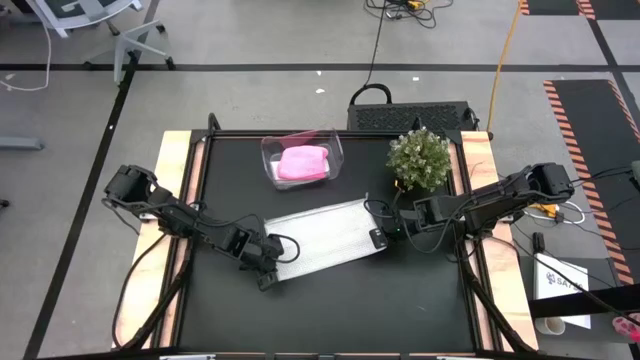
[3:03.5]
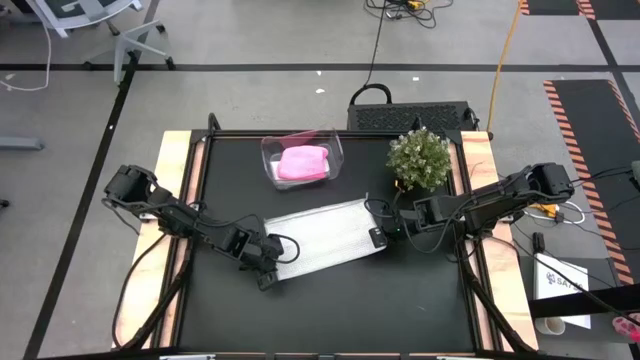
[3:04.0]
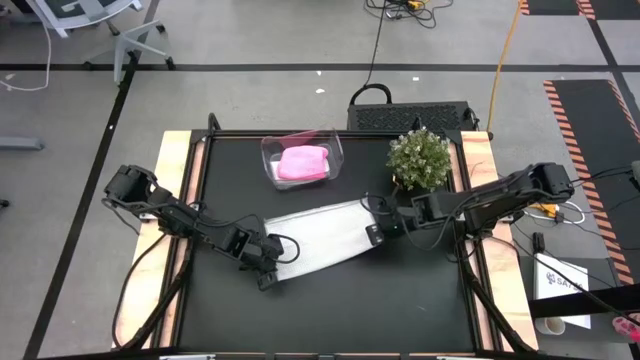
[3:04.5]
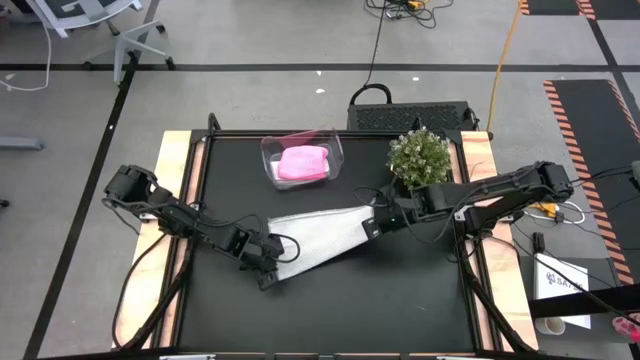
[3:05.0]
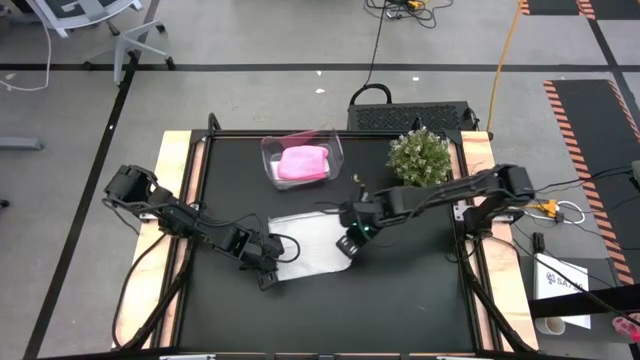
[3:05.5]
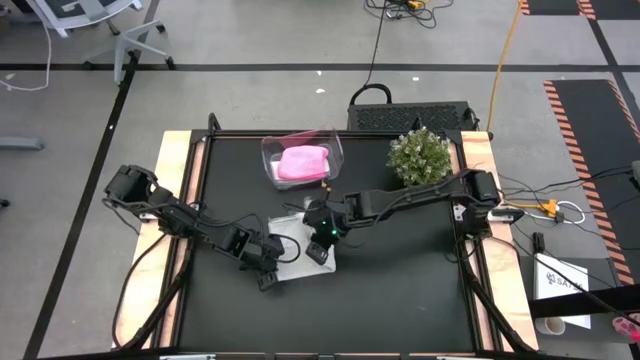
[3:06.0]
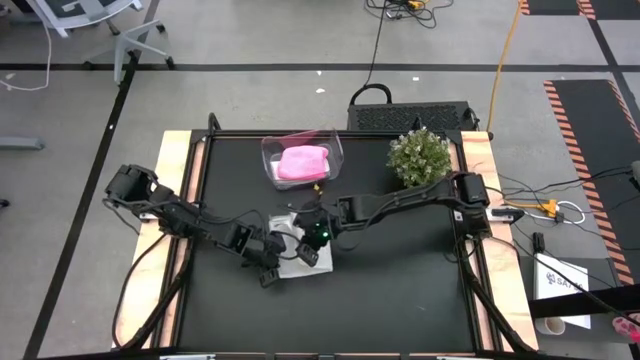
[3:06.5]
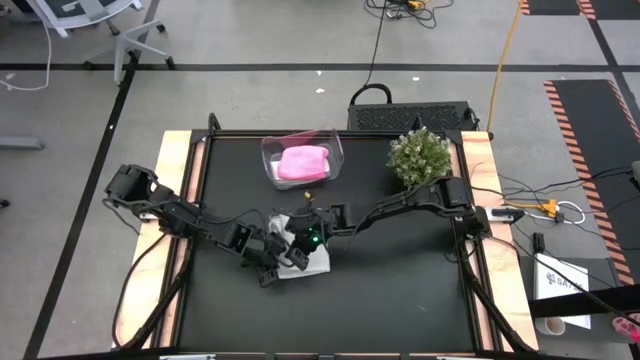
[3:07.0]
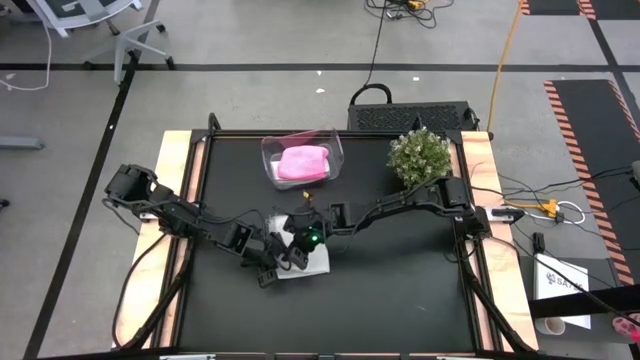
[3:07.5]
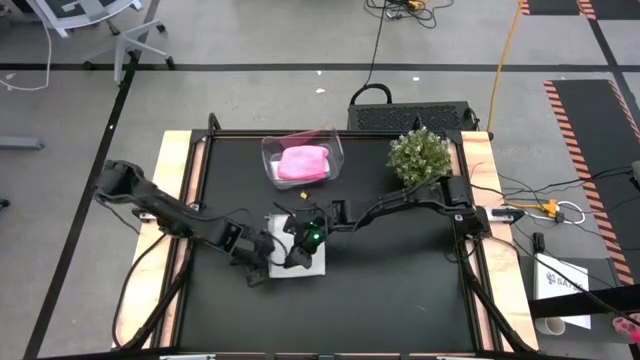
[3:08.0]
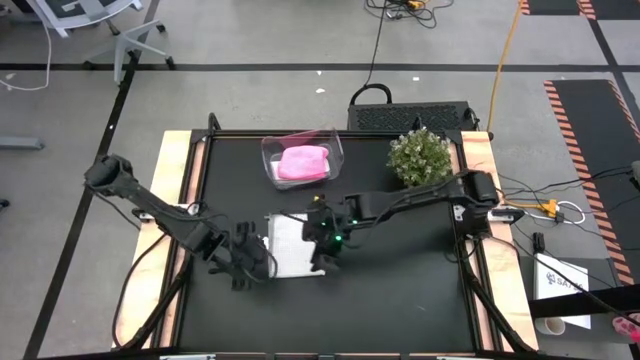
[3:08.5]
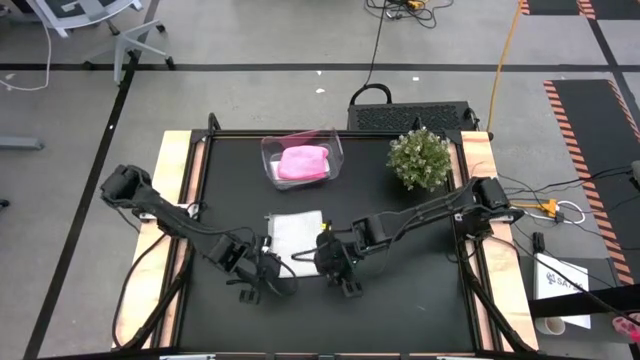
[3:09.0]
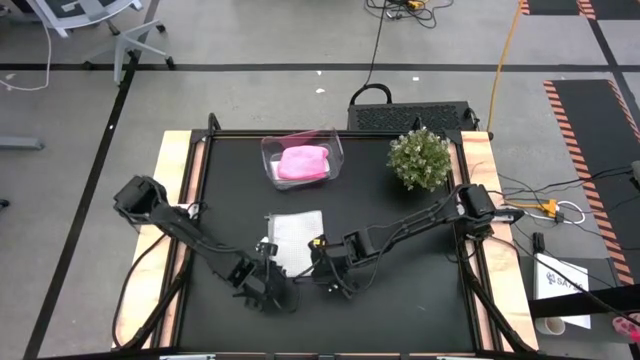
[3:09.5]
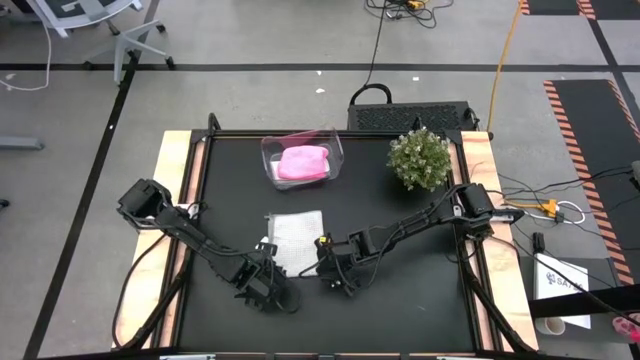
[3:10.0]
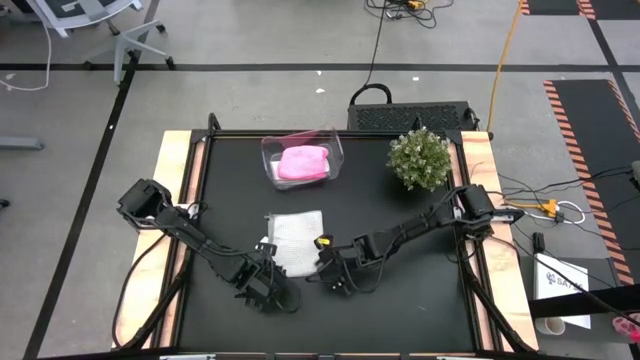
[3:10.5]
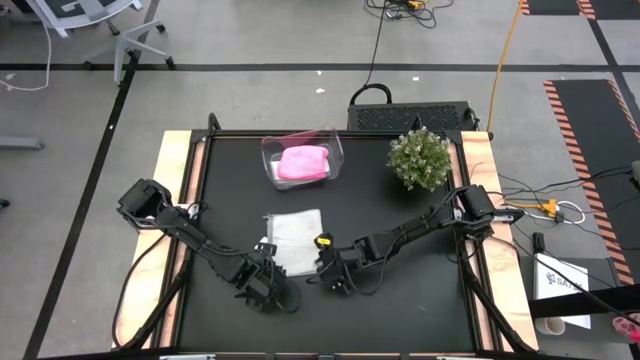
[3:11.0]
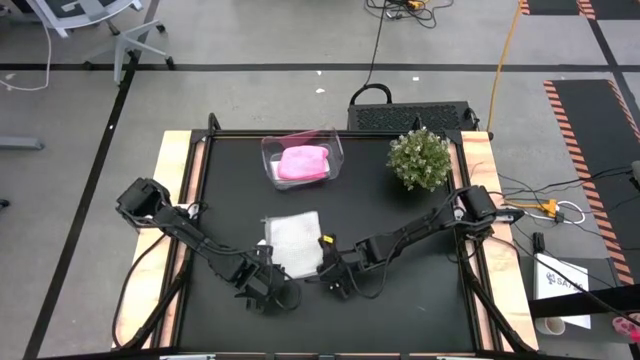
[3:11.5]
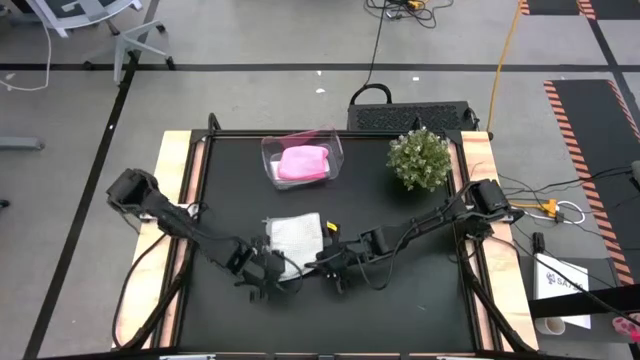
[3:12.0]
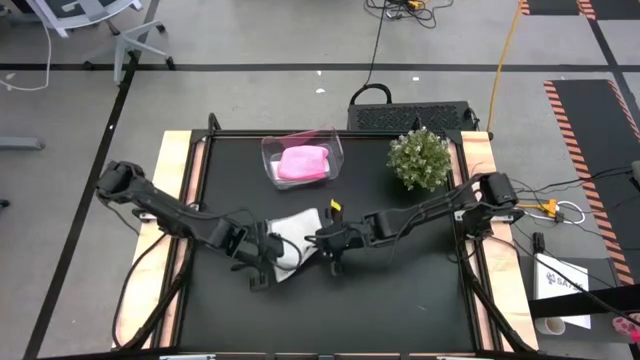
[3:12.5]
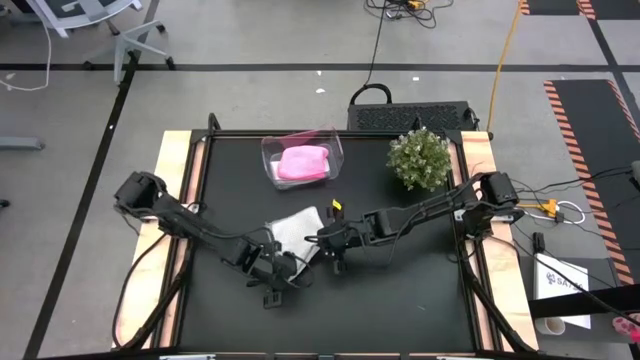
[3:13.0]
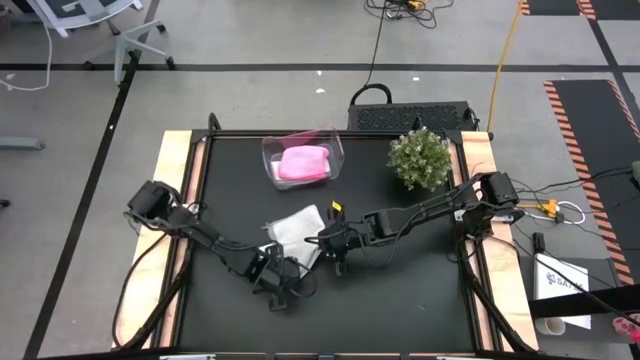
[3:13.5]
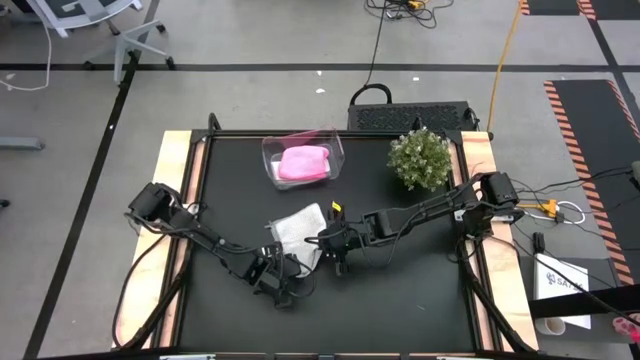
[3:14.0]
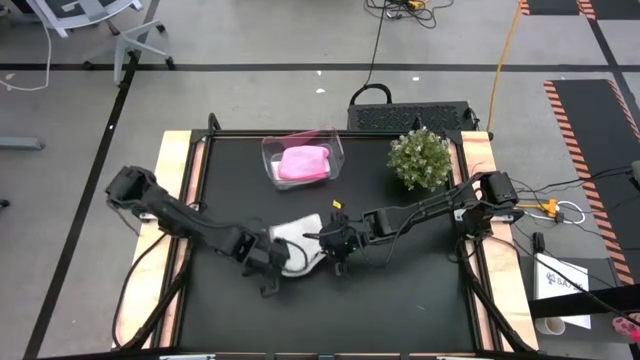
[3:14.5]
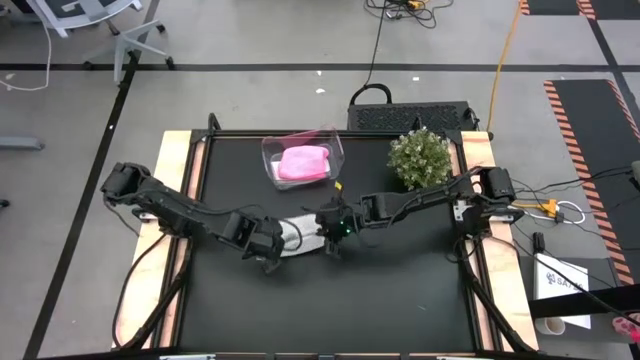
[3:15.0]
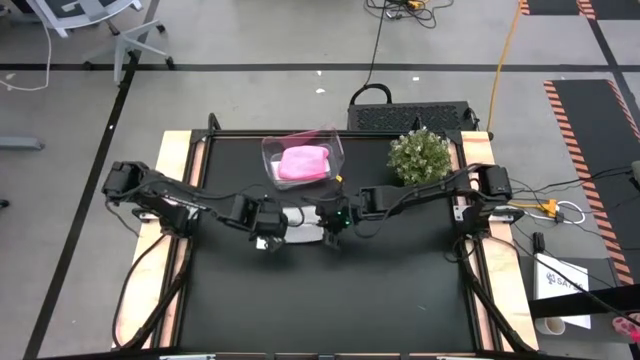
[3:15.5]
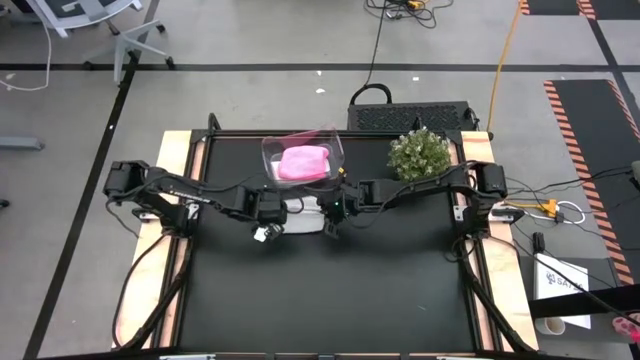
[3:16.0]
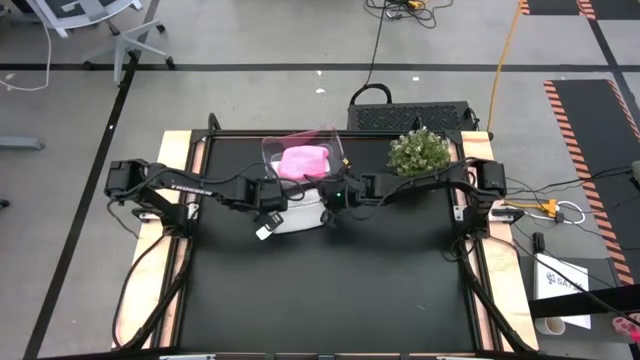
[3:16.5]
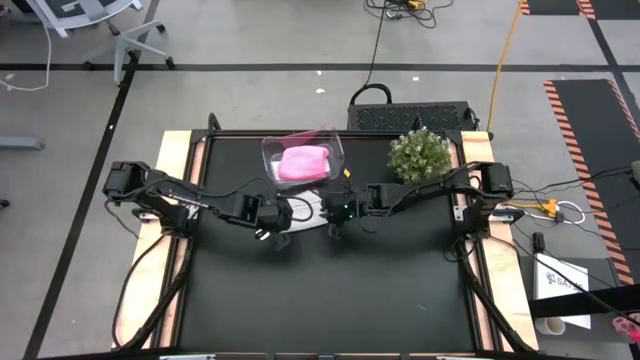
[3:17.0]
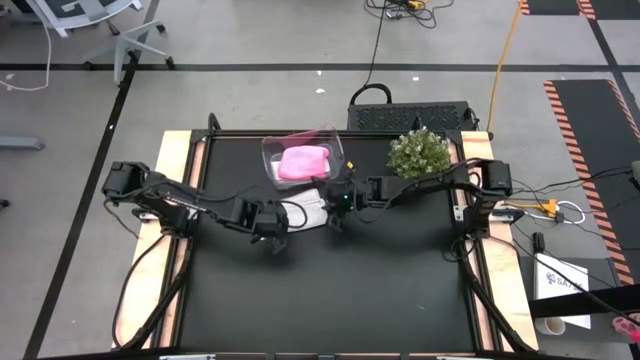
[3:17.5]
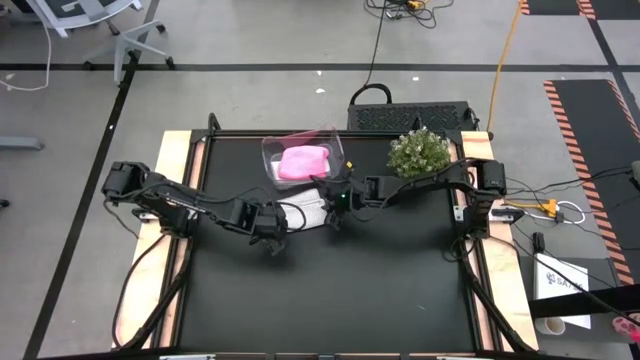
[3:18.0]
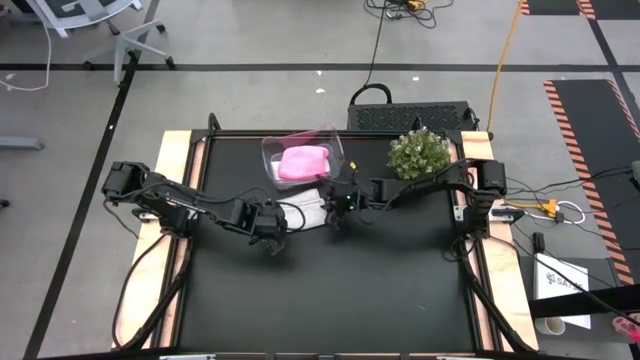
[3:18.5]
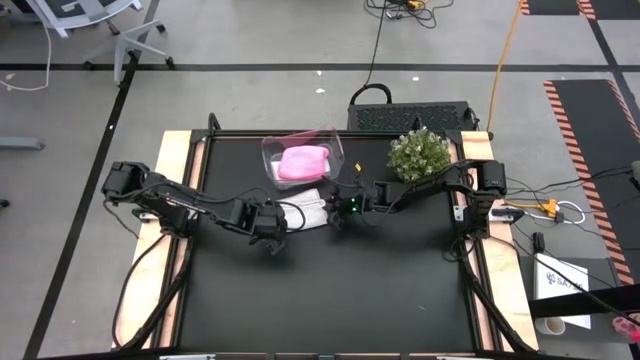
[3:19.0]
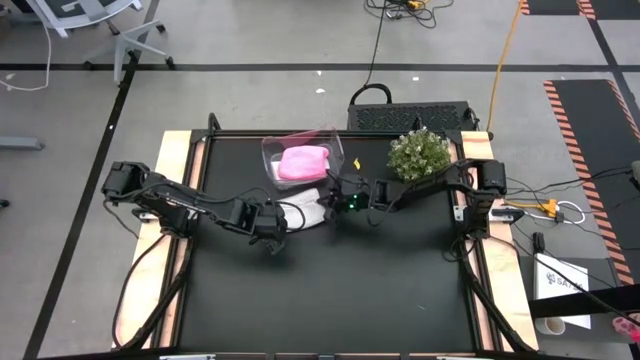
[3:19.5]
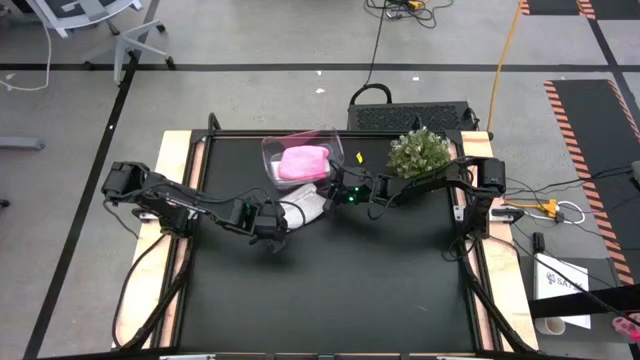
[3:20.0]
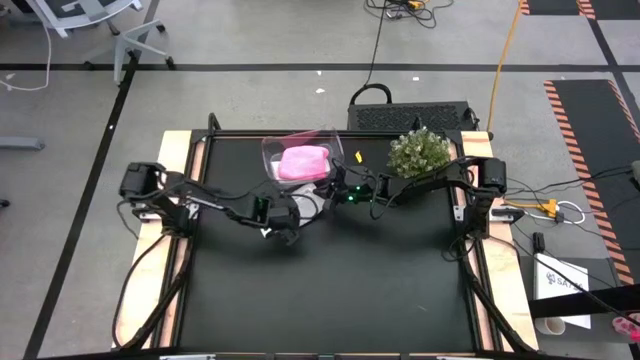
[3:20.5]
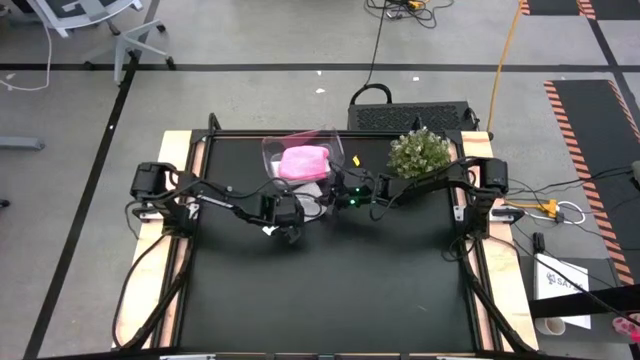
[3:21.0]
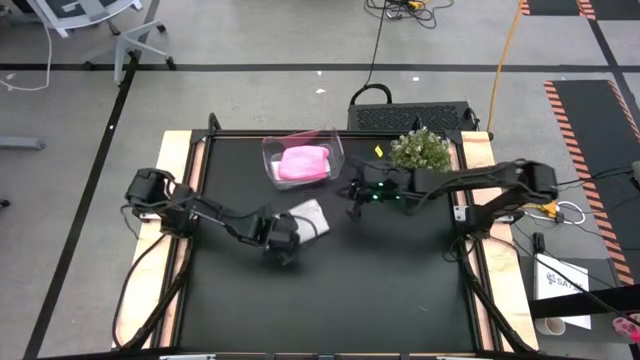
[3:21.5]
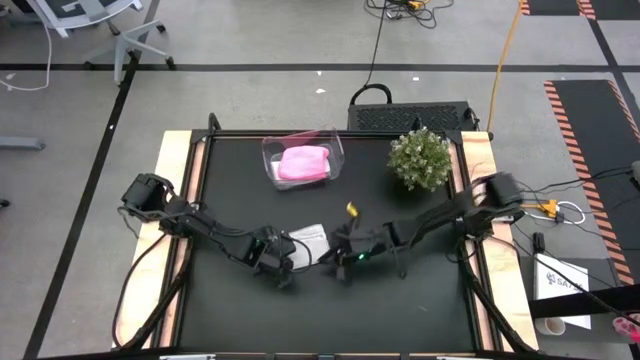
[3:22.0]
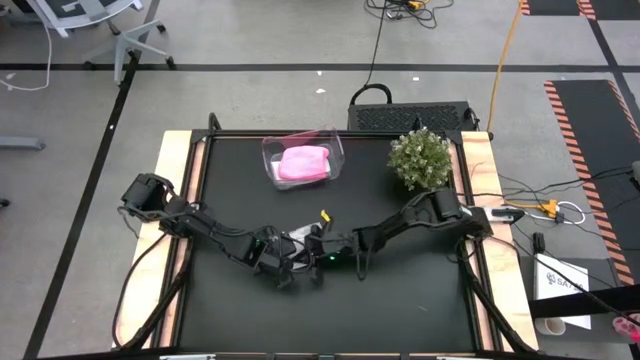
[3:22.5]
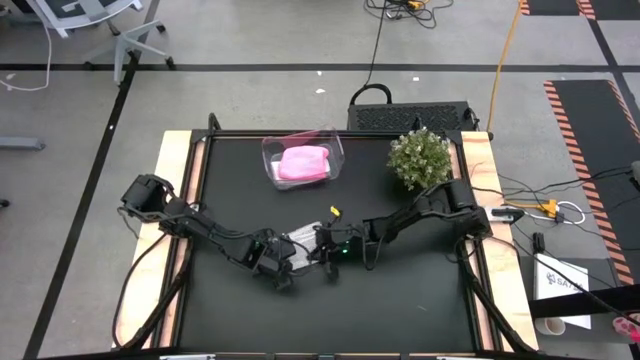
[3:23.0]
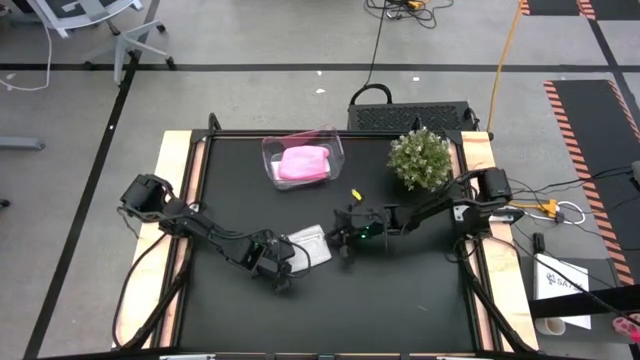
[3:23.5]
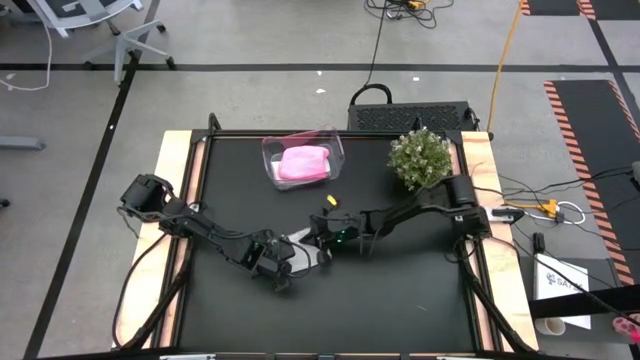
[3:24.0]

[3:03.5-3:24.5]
Task: Fold microfiber towels
Fold the gray towel

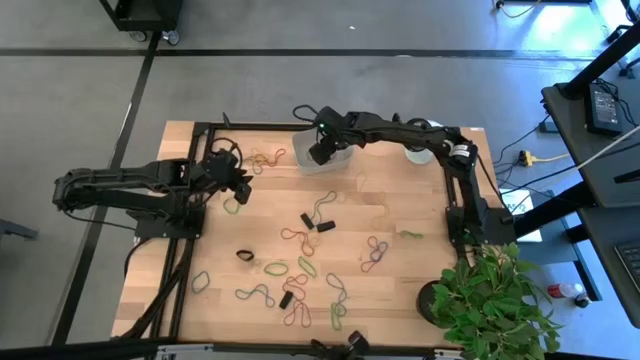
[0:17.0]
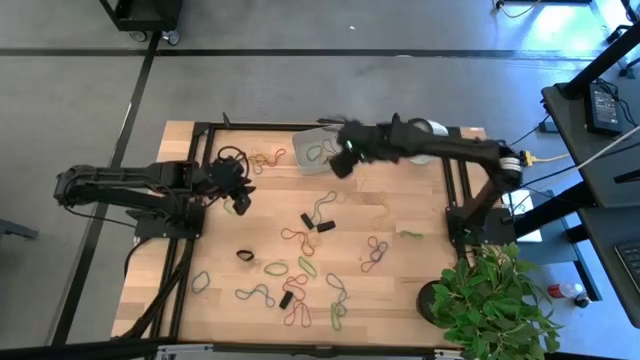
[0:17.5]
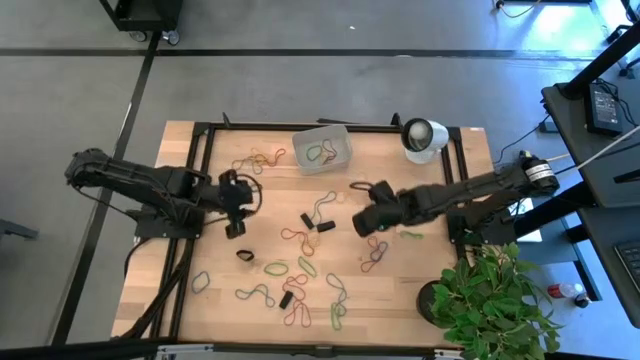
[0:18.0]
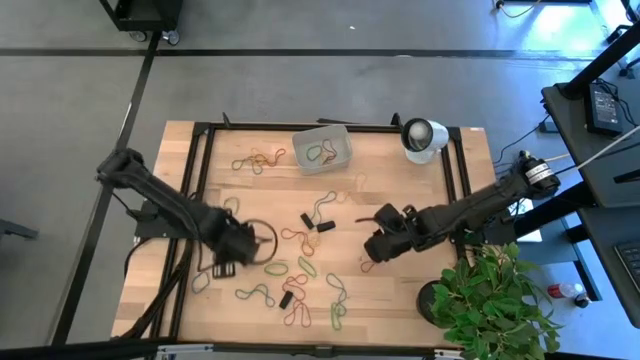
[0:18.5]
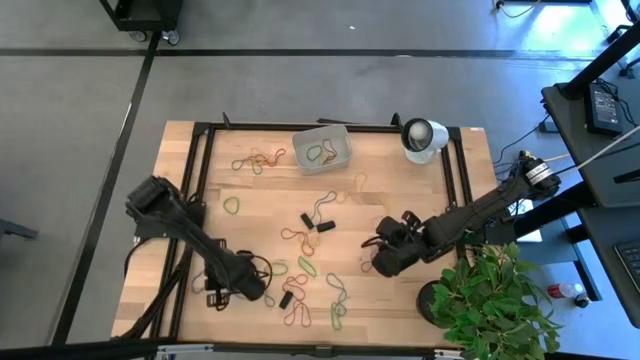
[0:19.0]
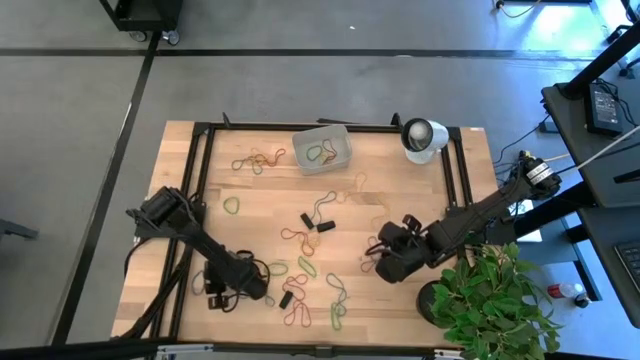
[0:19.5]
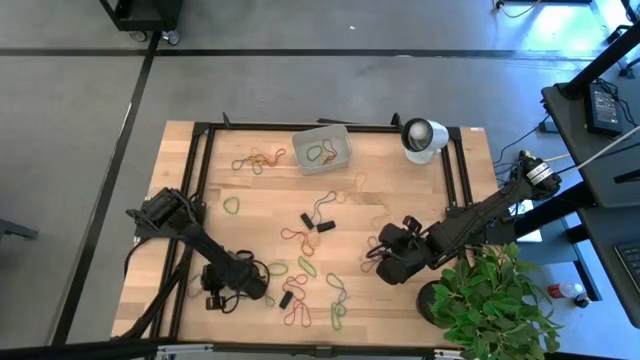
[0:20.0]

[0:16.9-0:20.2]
Task: Pick and place rubber bands into bin
Put the blue rubber band into the gray bin
